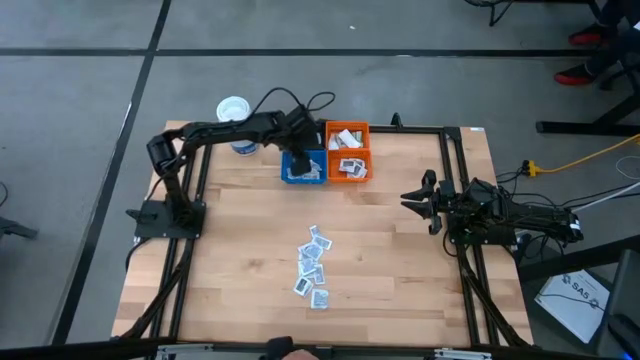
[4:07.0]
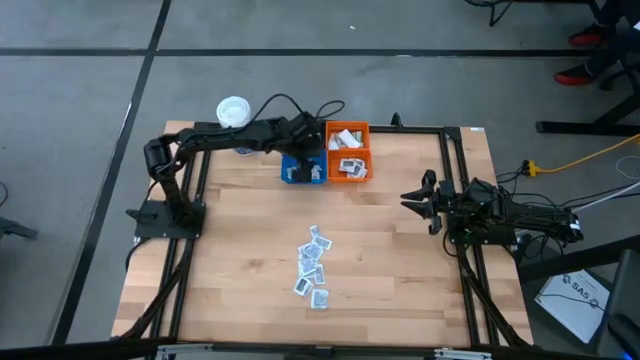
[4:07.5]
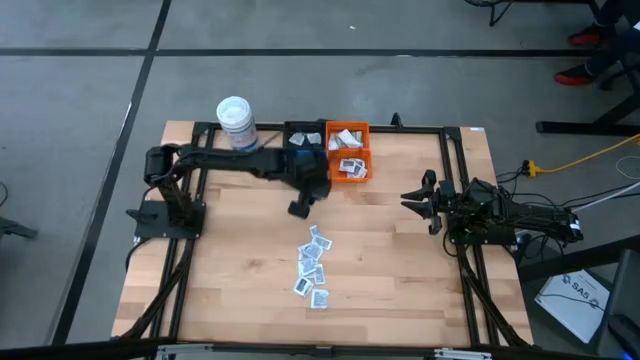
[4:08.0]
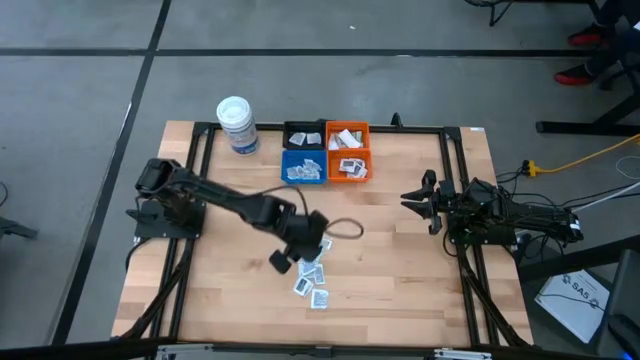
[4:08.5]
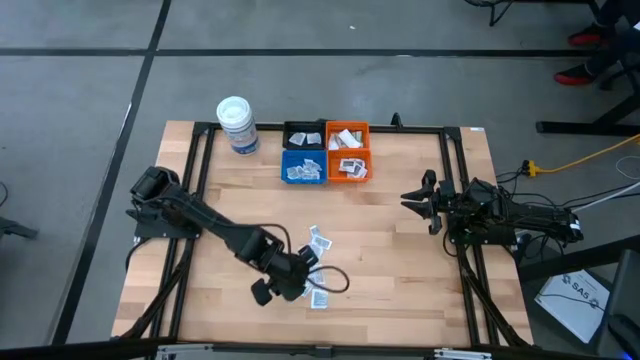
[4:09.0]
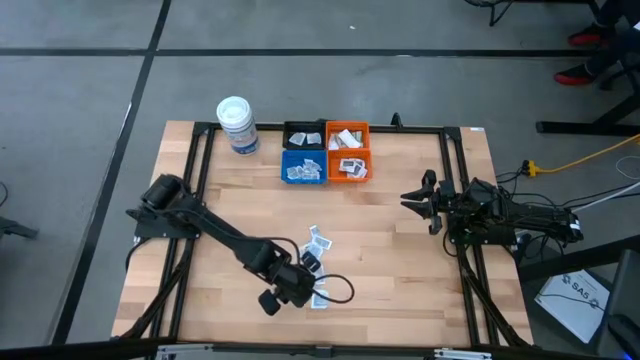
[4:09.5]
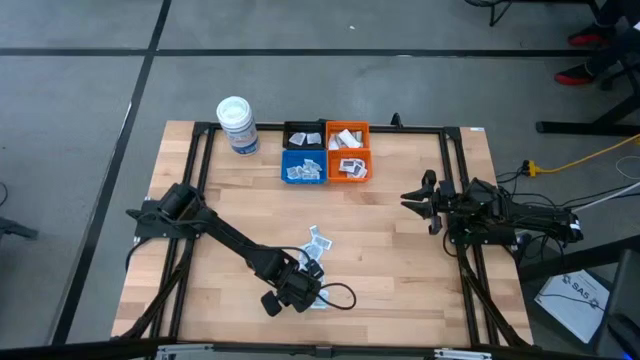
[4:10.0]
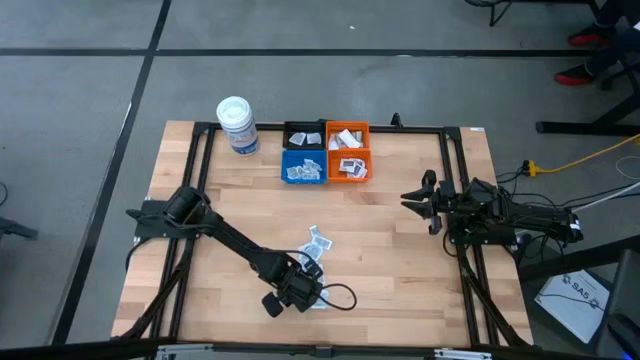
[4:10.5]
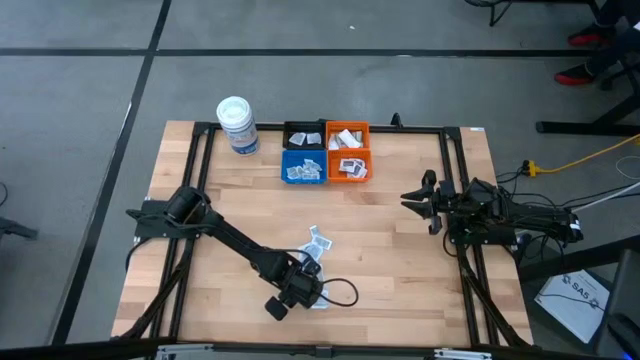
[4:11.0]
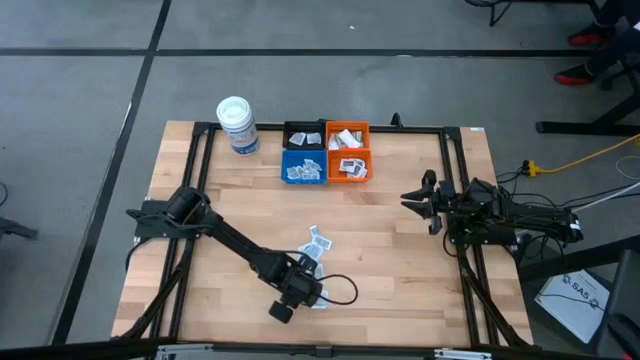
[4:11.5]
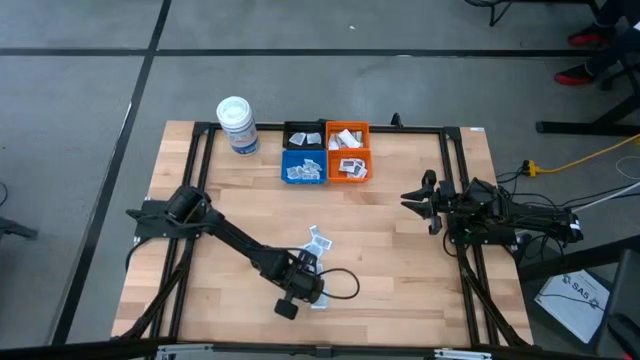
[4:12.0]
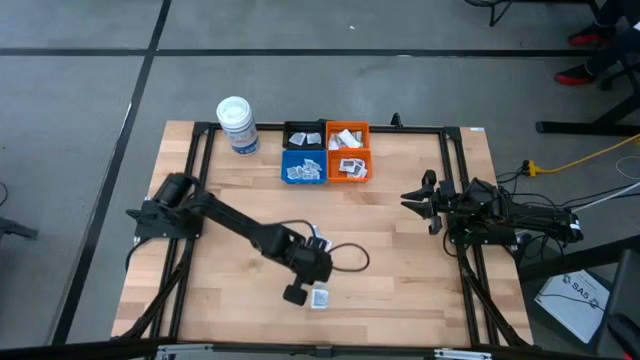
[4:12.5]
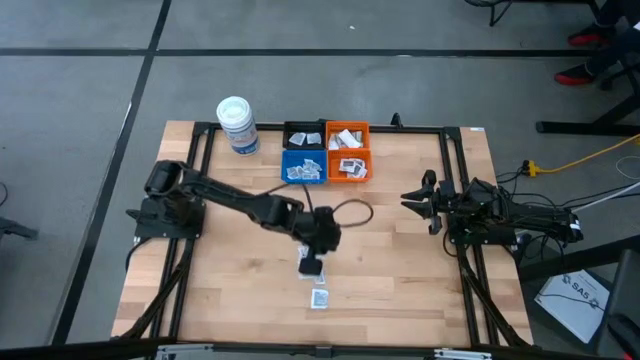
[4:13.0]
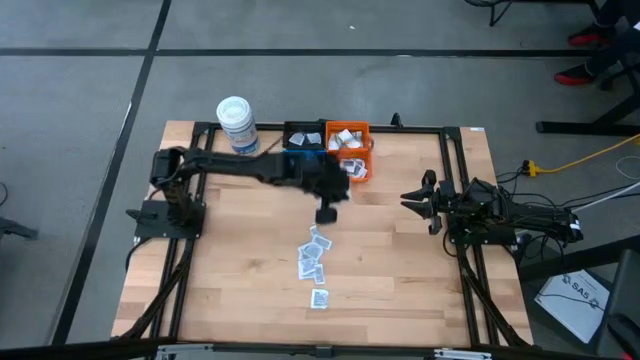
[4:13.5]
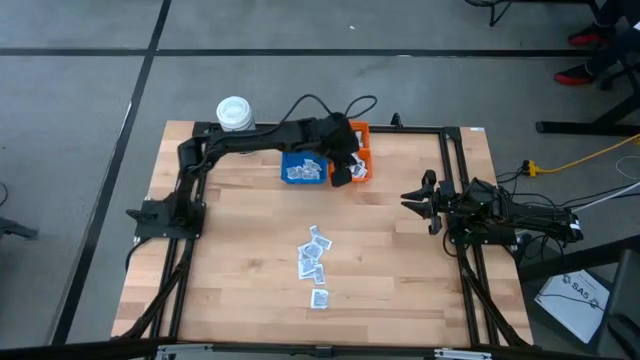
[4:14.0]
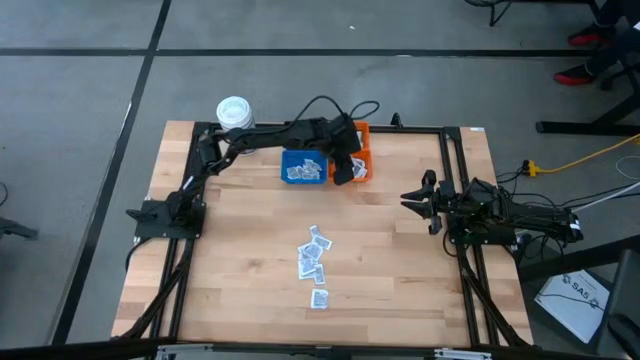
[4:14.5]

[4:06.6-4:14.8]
Task: Pick & Place First Aid Supplies
Put the towelette pack into the bottom orange bin

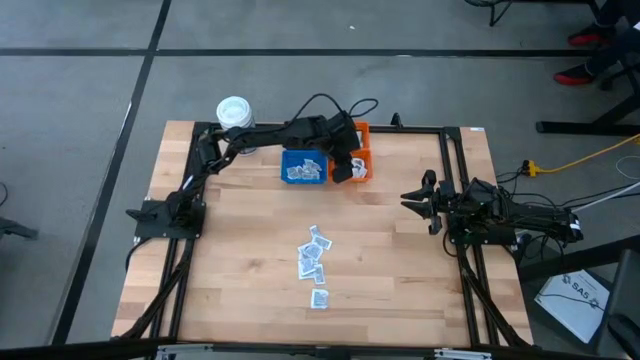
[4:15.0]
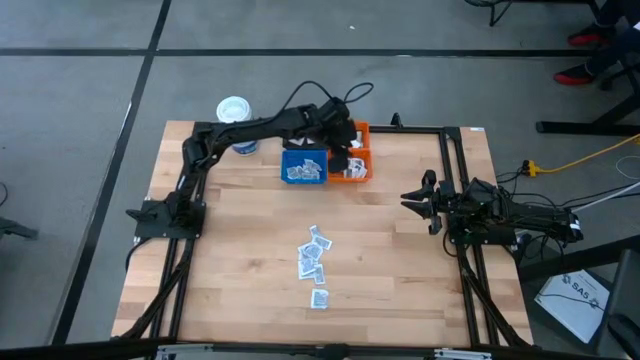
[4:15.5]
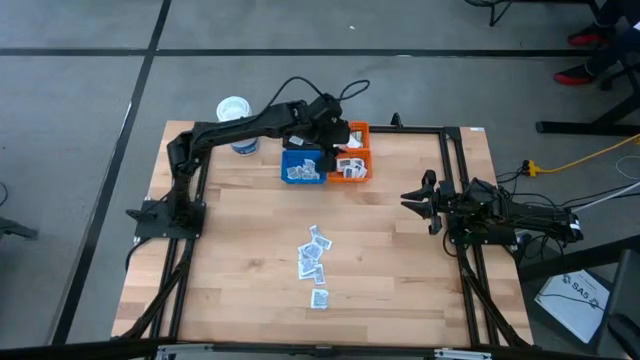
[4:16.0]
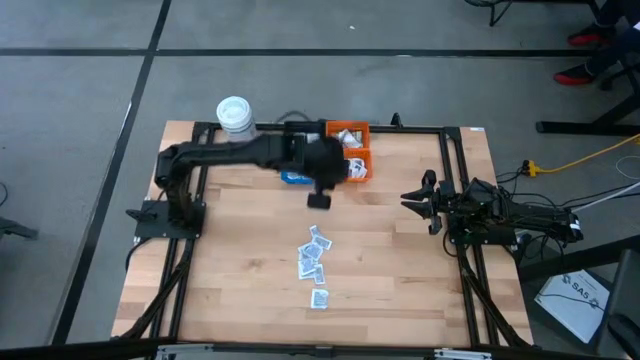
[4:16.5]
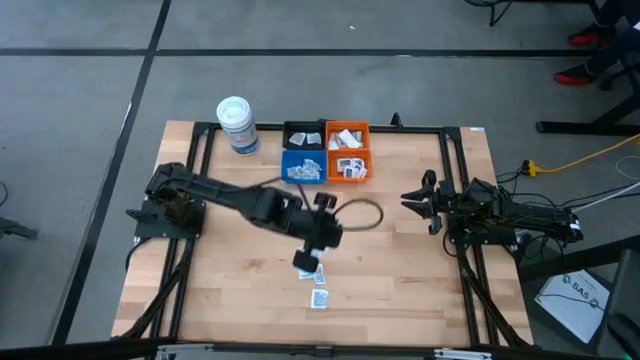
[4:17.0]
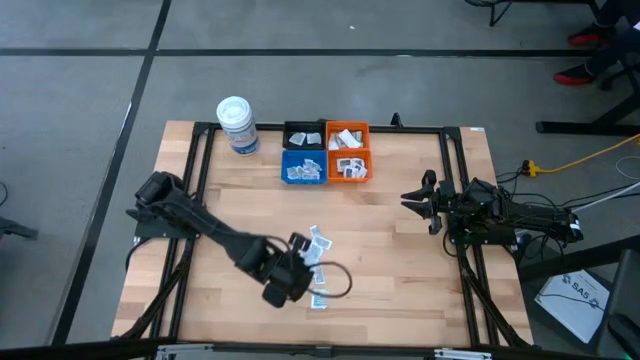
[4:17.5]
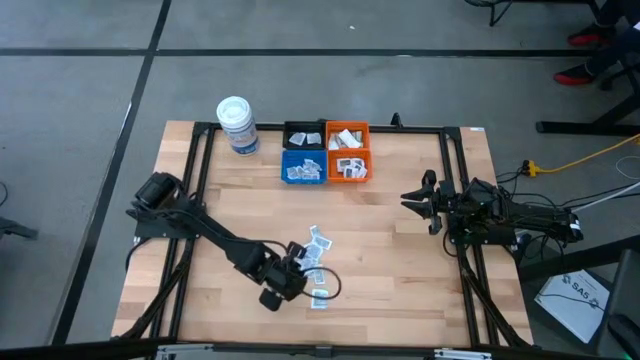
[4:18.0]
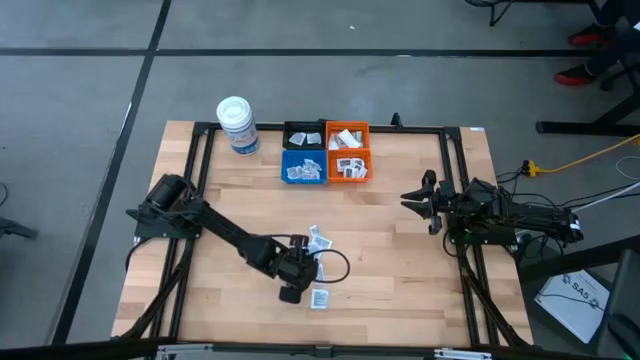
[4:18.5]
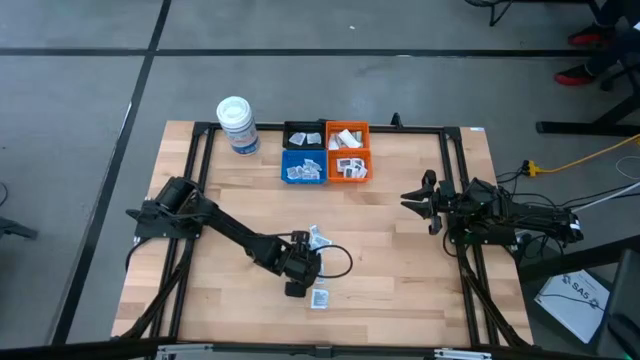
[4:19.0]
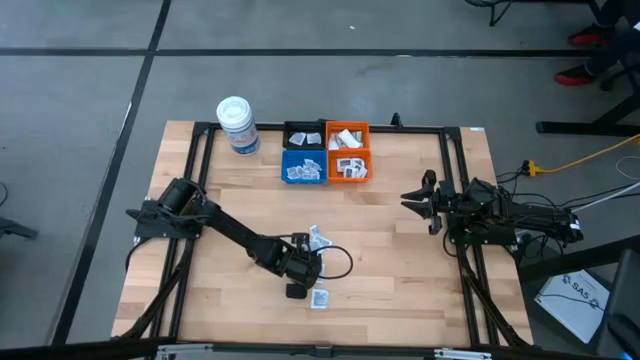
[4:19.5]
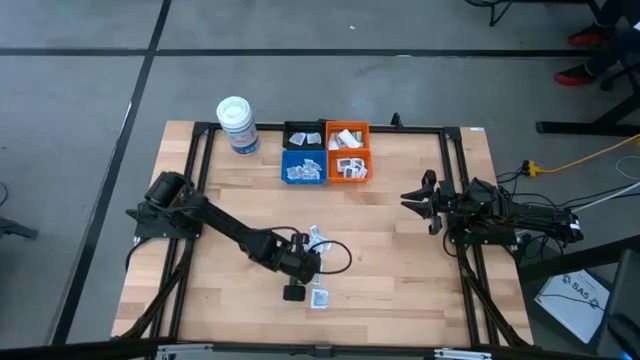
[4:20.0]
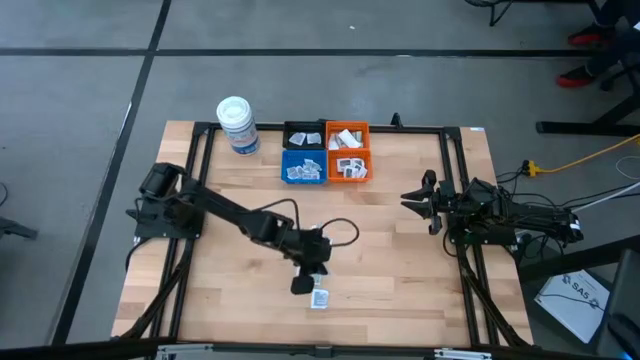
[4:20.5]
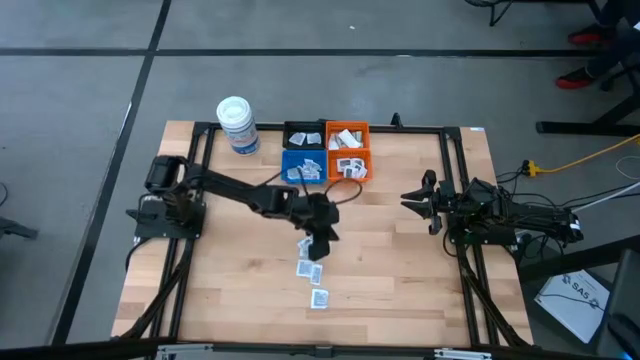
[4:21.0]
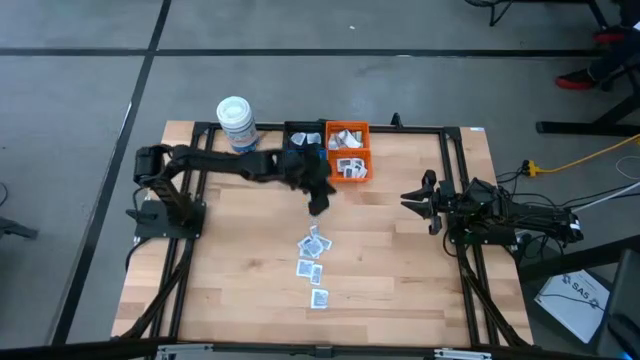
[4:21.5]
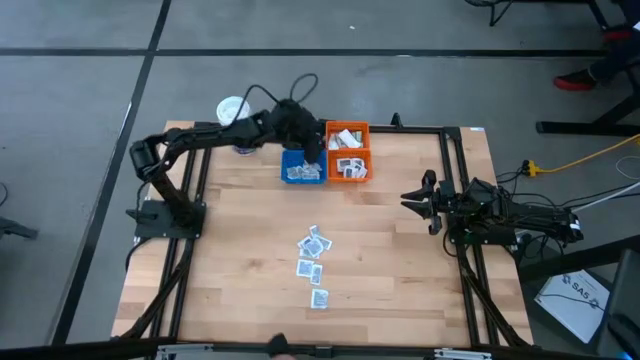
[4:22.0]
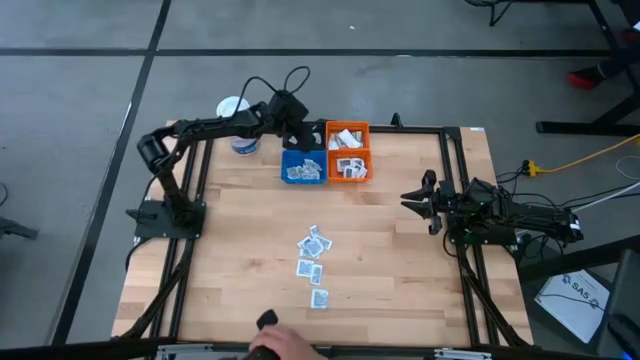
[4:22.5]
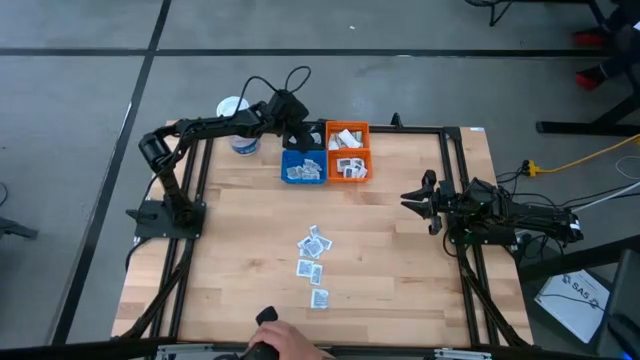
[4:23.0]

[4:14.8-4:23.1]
Put the alcohol pad into the black bin

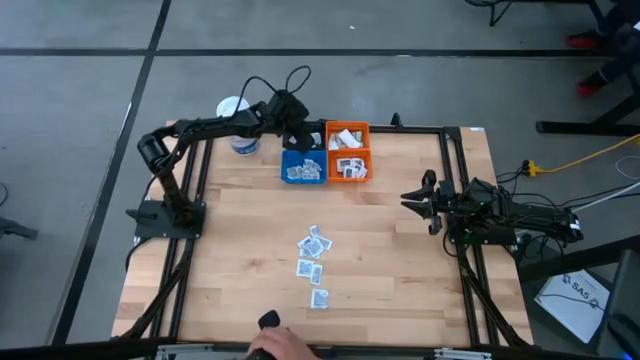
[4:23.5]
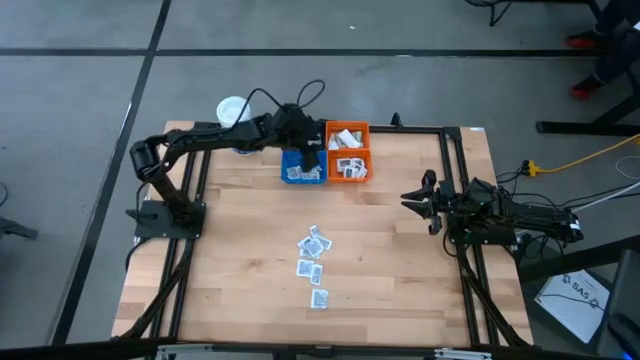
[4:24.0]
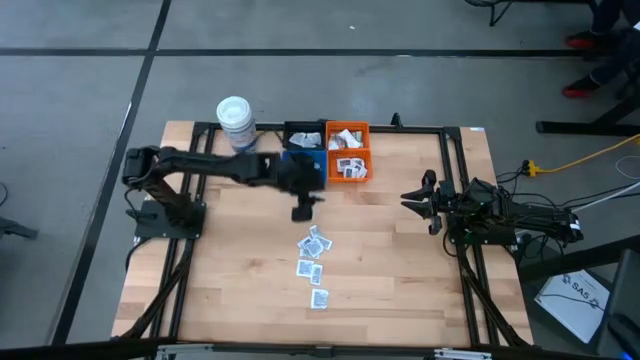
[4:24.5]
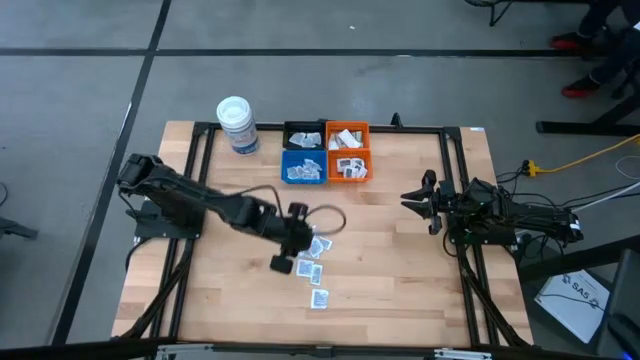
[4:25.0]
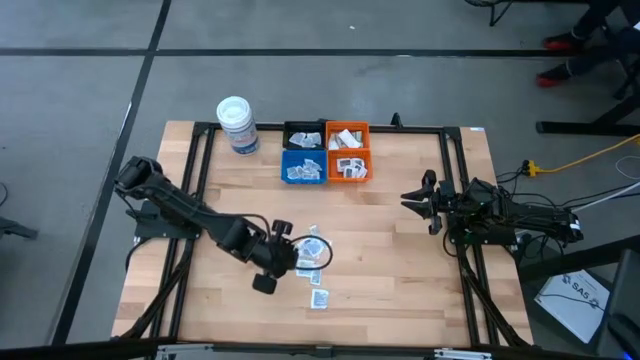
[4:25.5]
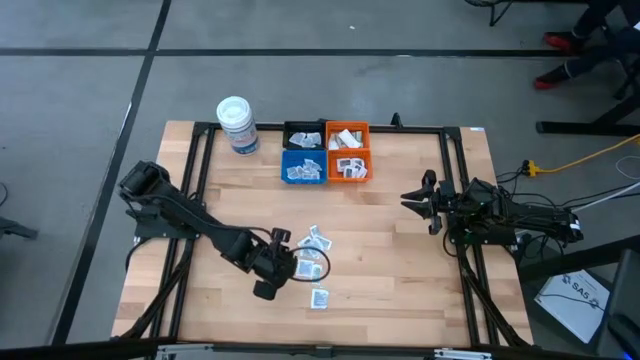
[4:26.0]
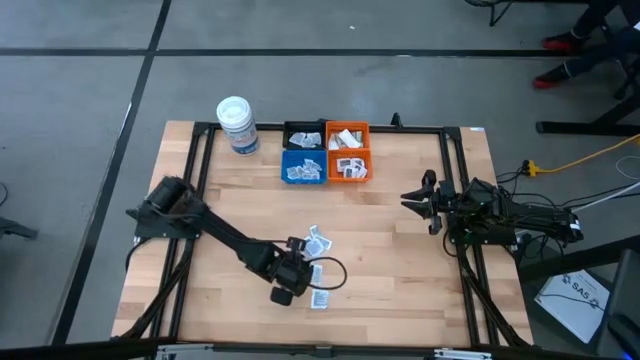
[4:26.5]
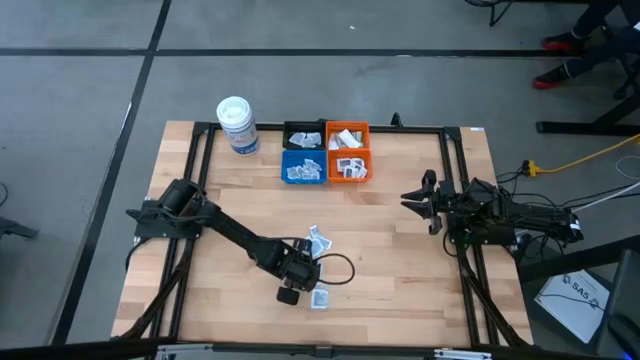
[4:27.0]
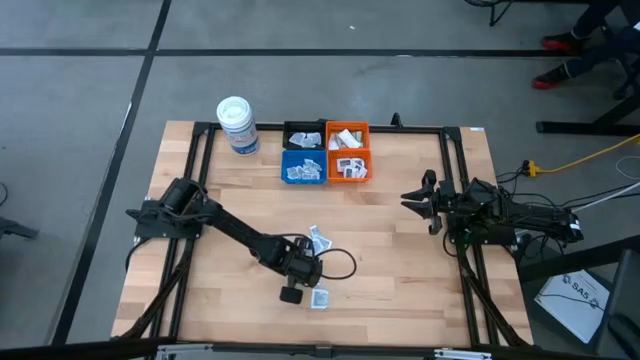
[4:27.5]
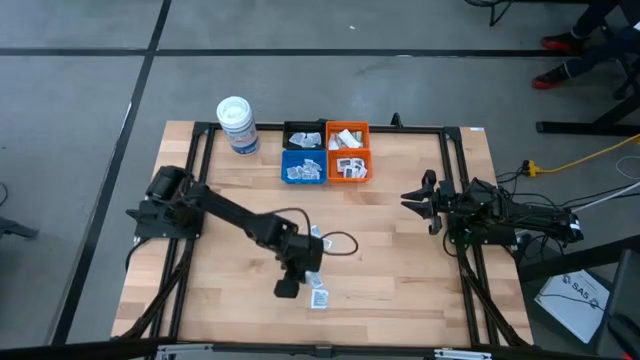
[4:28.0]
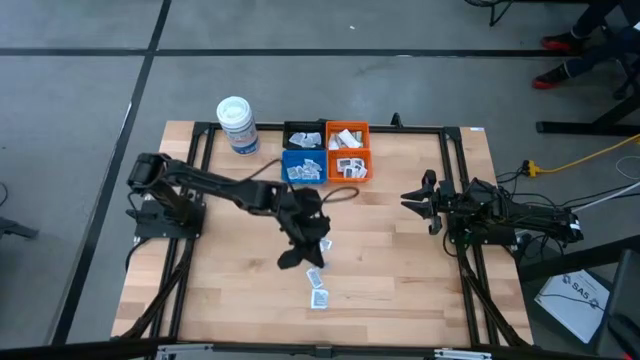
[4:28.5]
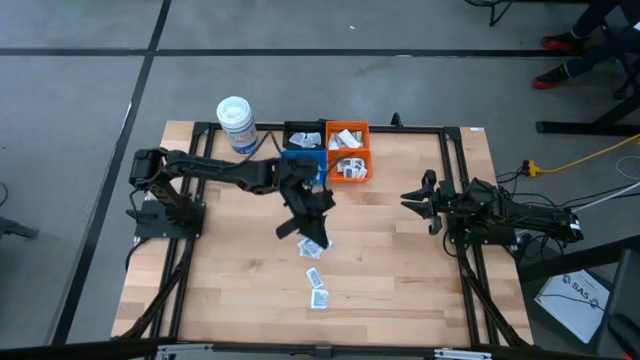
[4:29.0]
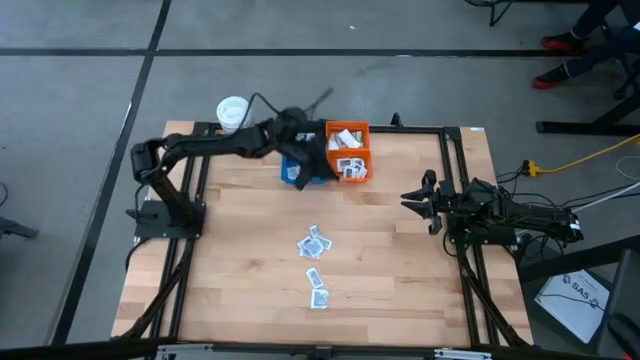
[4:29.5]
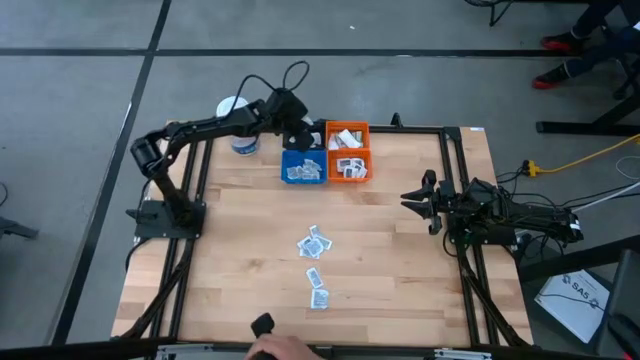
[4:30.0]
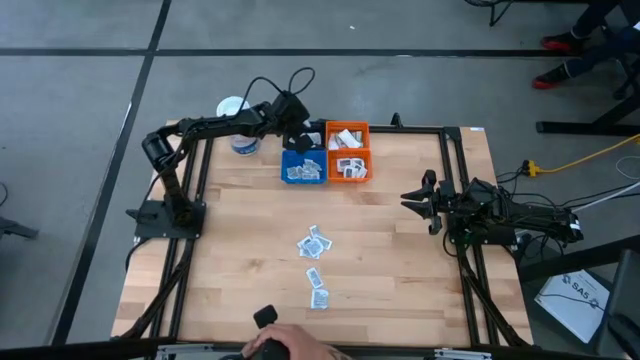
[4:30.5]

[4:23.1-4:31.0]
Put the alcohol pad into the black bin
